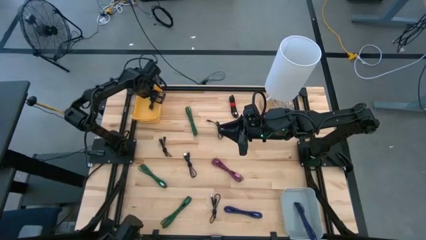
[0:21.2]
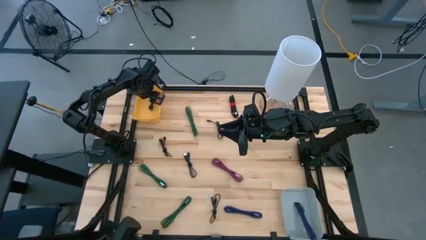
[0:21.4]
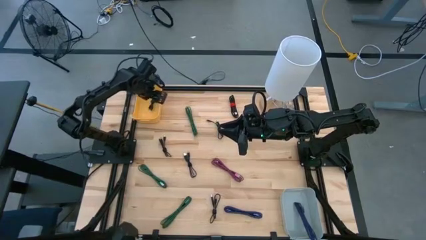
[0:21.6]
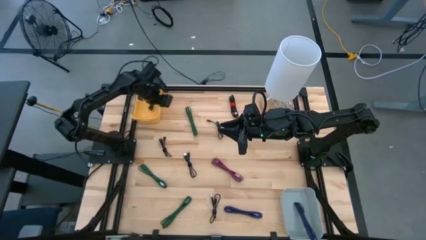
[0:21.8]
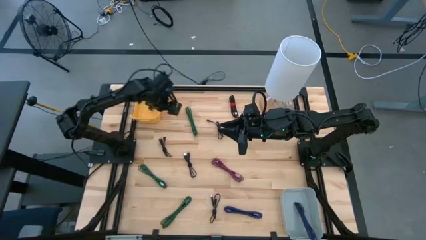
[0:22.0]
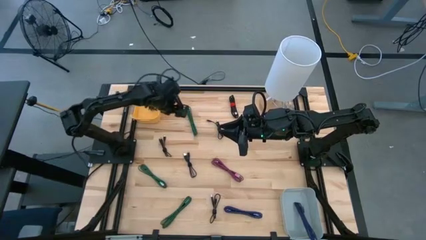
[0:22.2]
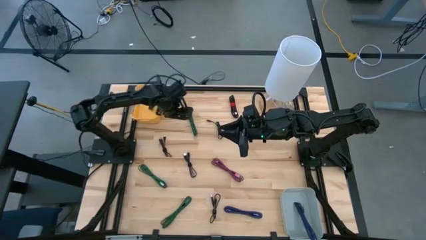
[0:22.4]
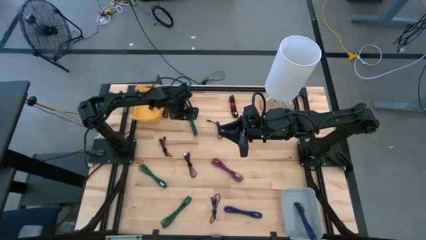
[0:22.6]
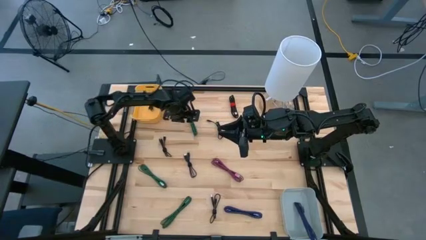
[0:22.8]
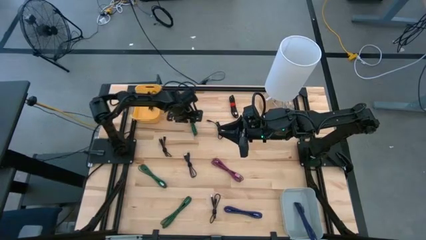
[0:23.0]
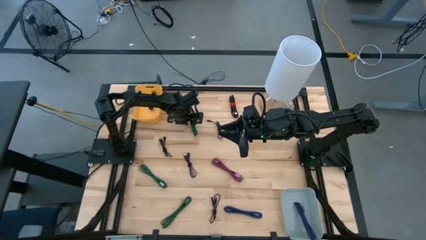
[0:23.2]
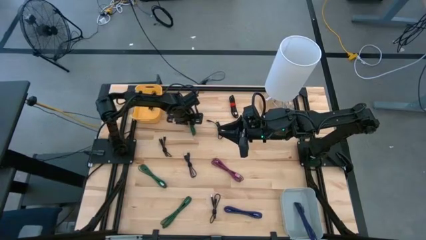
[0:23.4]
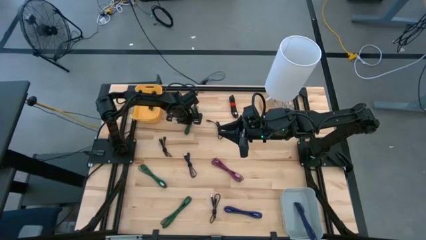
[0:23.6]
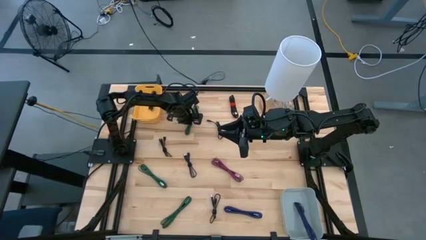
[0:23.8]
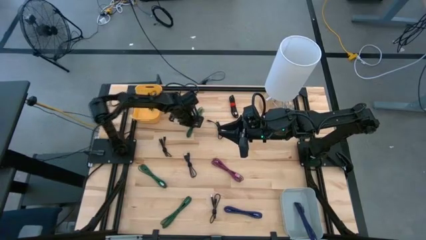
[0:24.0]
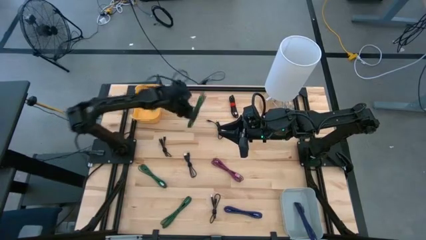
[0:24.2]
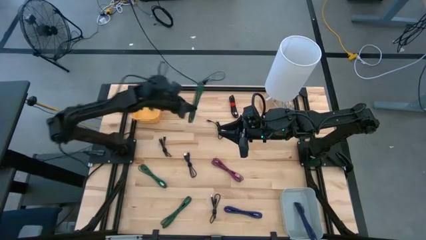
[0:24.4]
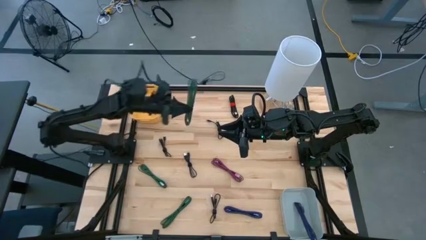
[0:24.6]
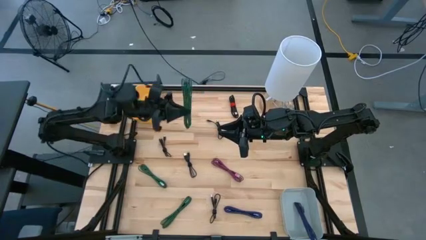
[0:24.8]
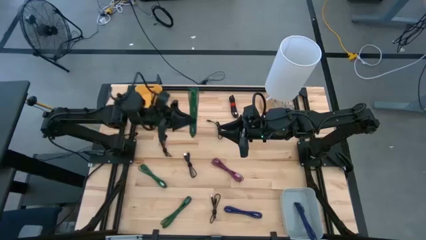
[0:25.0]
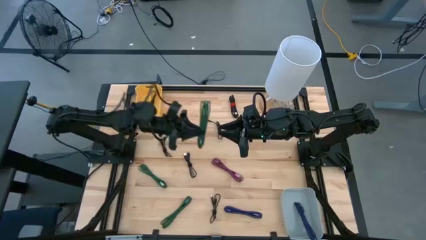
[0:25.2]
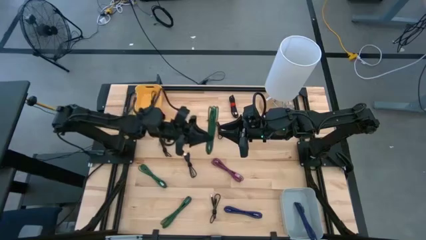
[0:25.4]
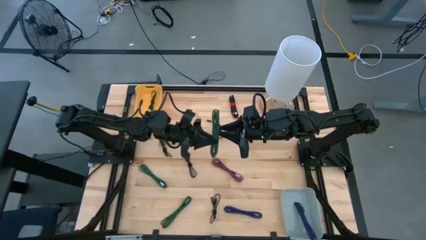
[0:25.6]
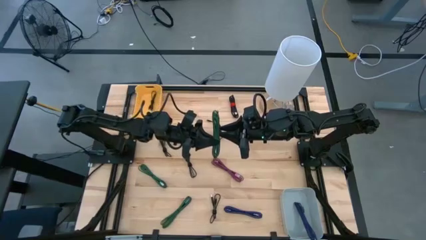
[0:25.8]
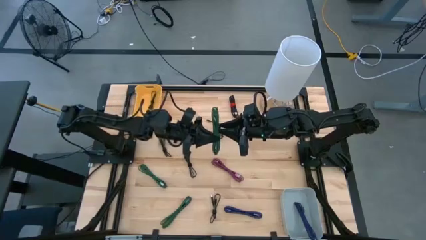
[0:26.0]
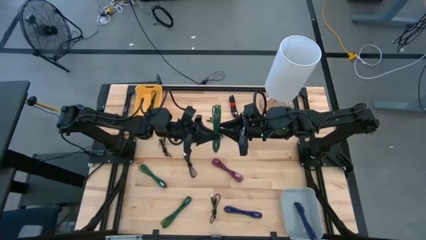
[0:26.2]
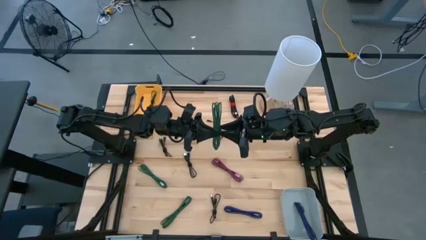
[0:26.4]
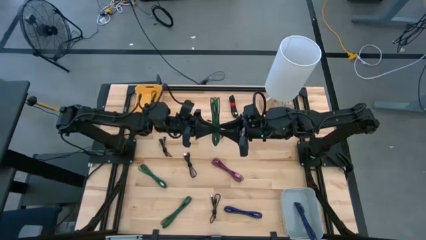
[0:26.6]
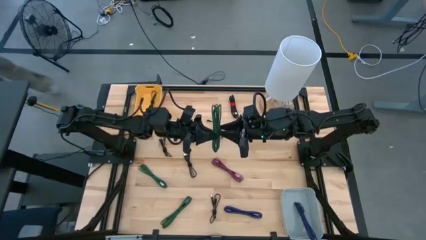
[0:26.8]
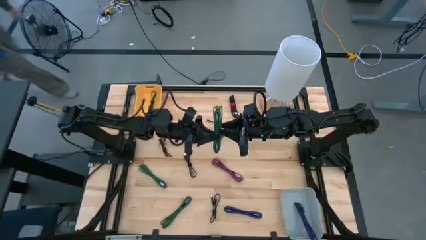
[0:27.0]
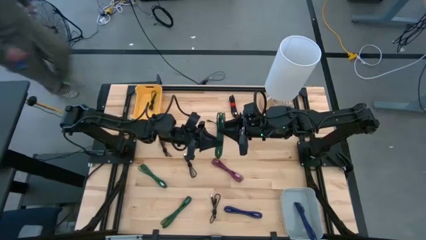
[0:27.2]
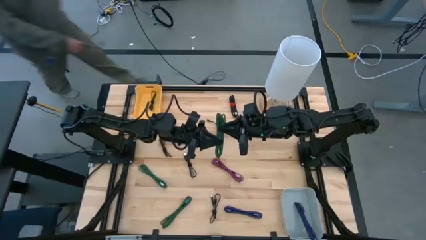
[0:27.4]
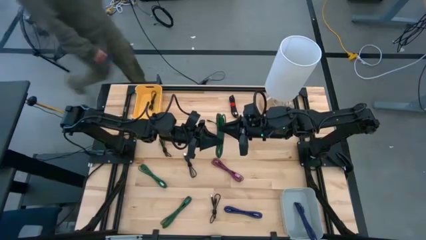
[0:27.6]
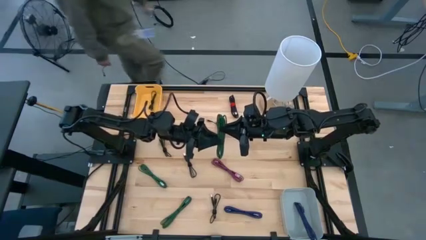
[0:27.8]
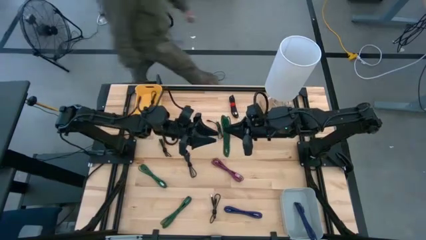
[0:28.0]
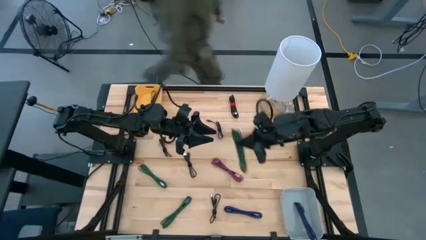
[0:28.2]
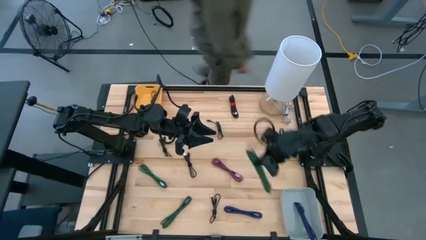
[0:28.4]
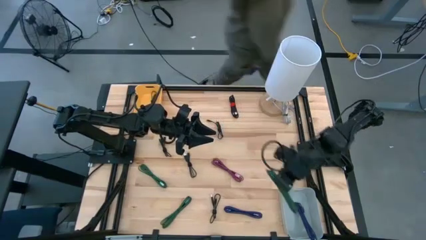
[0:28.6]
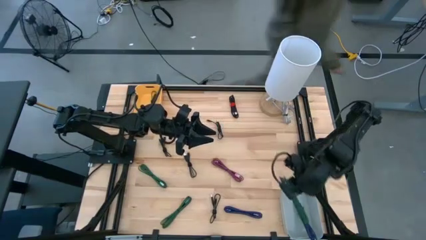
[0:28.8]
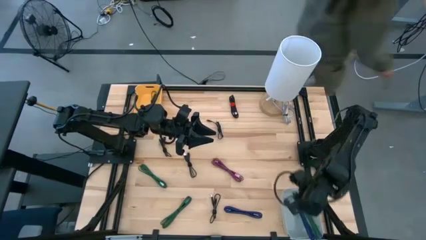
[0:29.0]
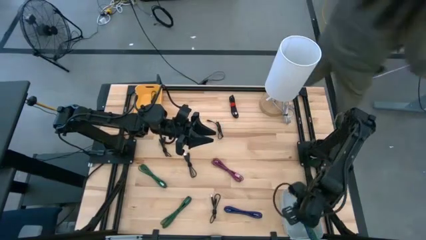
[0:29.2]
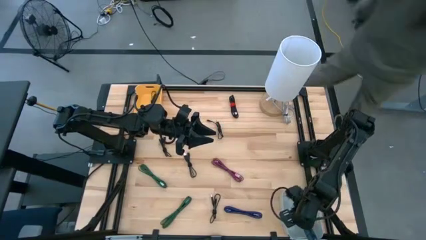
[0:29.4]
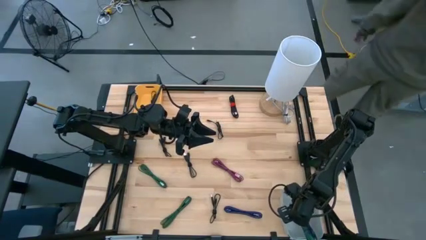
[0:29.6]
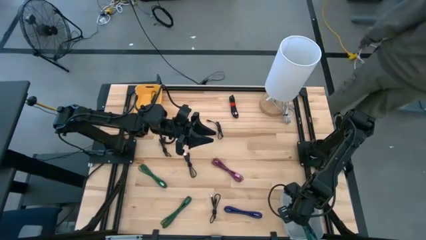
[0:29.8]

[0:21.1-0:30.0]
Task: Pick & Place USB Port
Put the green charger cable into the gray bin

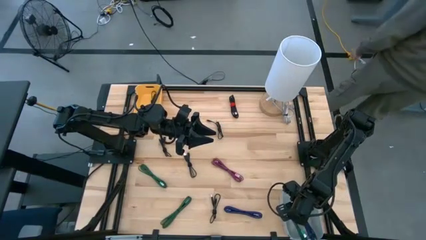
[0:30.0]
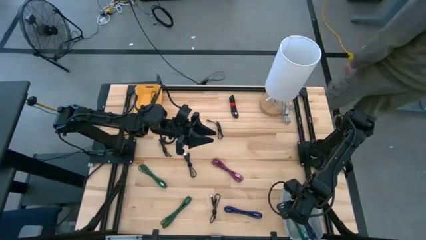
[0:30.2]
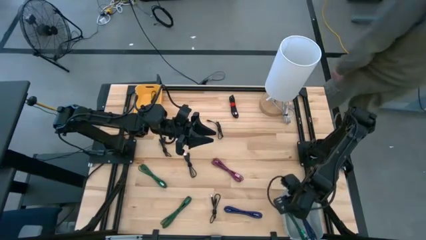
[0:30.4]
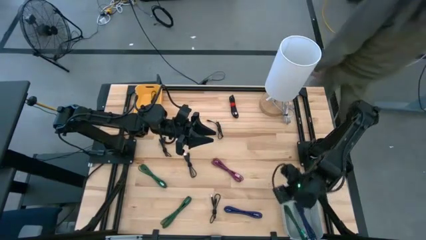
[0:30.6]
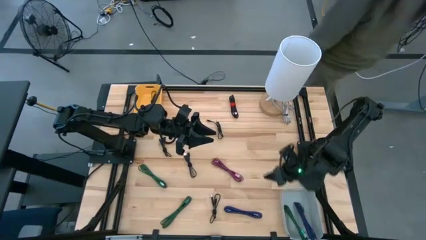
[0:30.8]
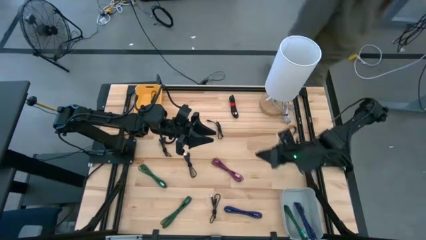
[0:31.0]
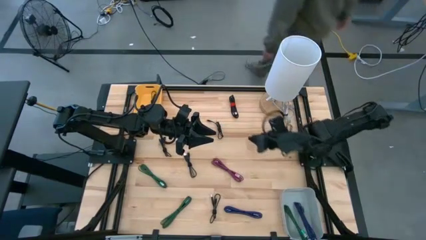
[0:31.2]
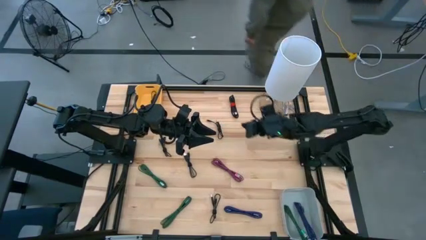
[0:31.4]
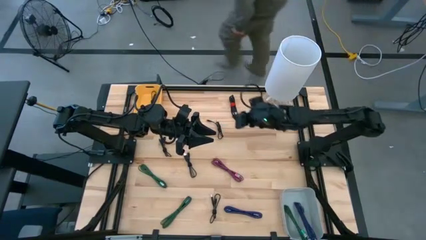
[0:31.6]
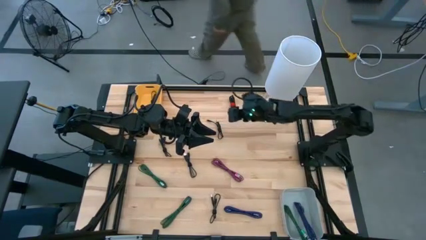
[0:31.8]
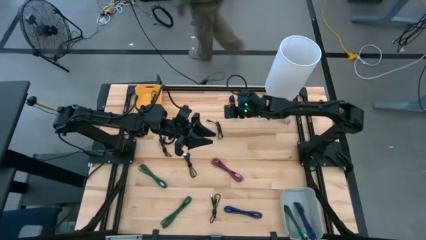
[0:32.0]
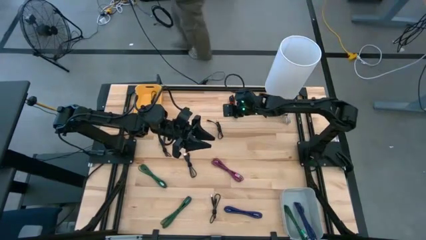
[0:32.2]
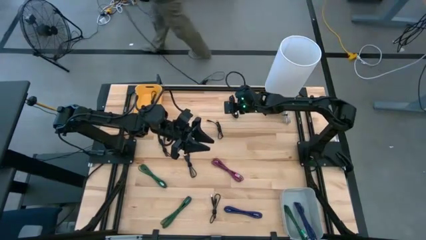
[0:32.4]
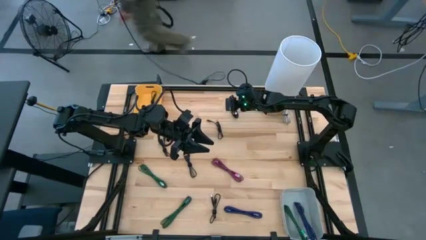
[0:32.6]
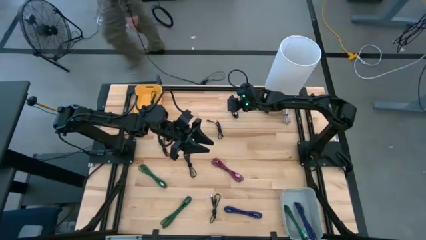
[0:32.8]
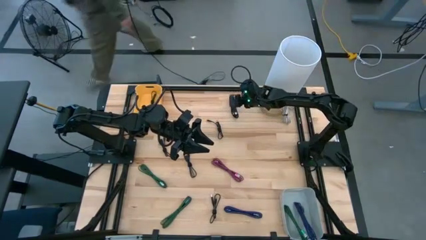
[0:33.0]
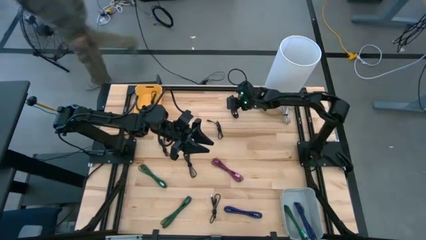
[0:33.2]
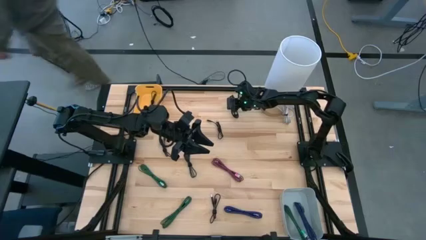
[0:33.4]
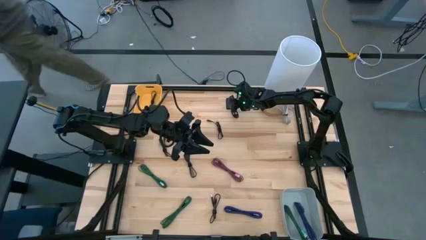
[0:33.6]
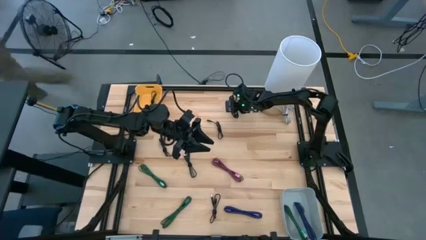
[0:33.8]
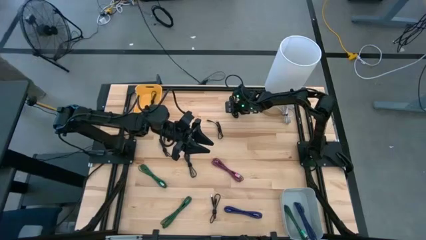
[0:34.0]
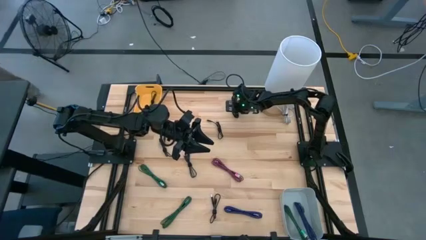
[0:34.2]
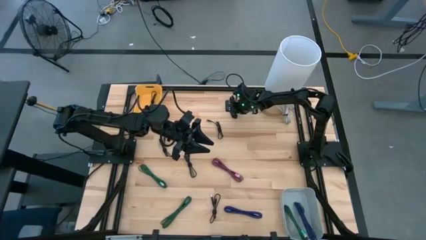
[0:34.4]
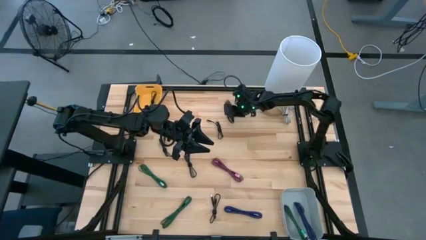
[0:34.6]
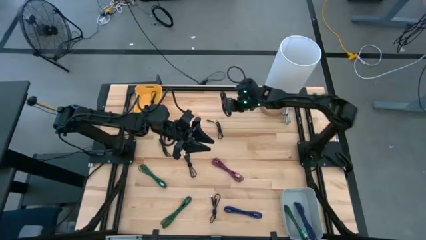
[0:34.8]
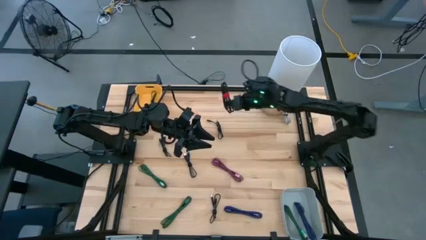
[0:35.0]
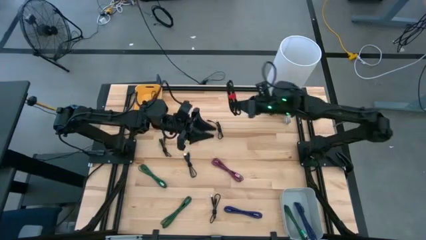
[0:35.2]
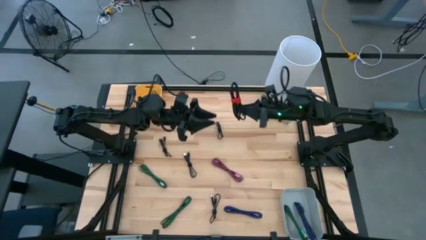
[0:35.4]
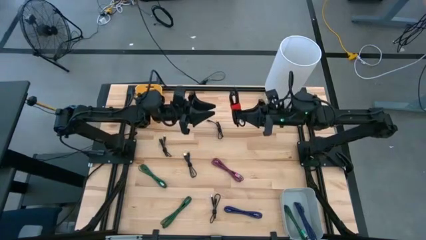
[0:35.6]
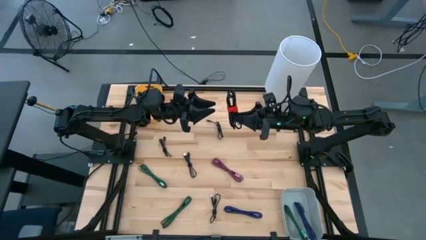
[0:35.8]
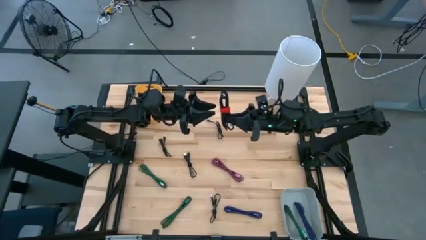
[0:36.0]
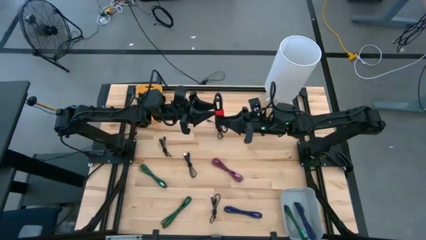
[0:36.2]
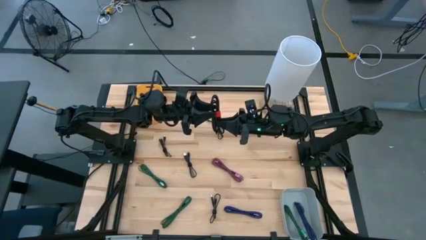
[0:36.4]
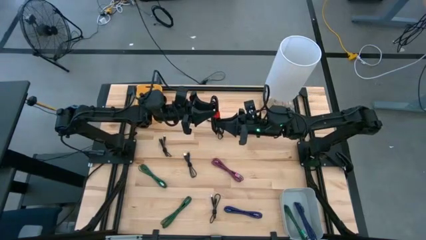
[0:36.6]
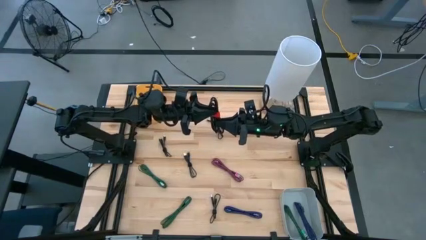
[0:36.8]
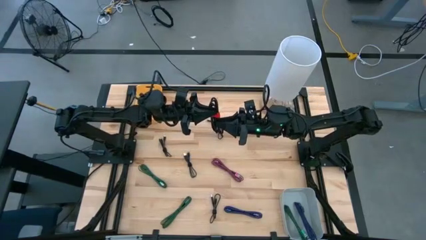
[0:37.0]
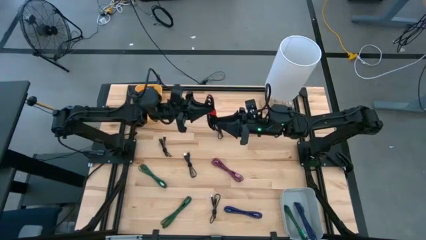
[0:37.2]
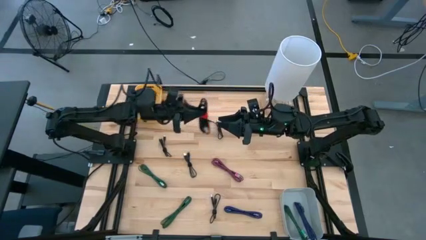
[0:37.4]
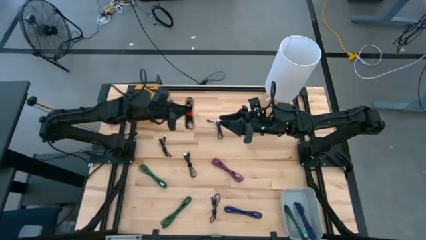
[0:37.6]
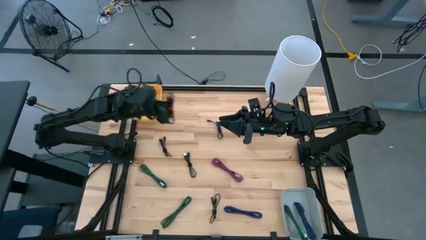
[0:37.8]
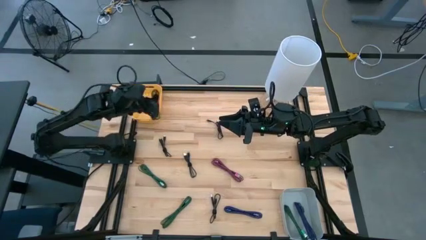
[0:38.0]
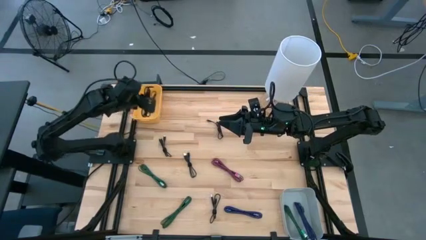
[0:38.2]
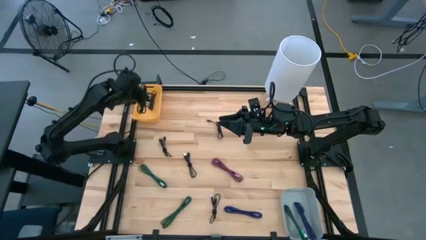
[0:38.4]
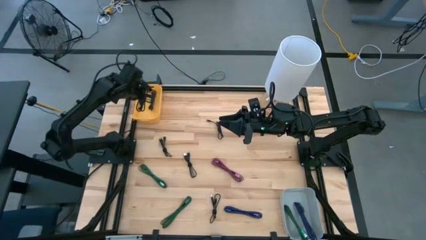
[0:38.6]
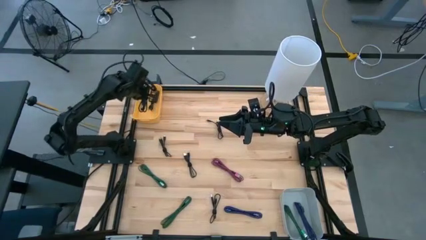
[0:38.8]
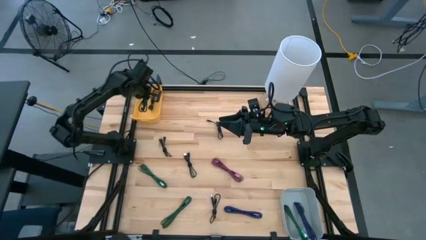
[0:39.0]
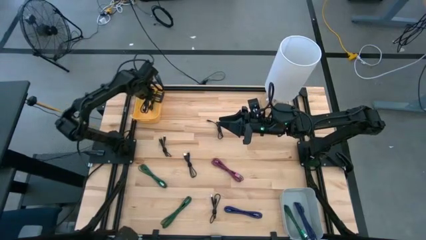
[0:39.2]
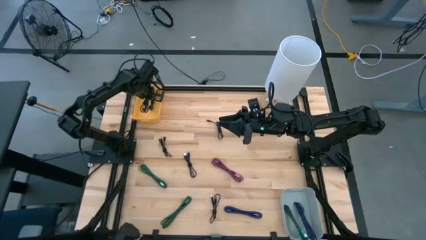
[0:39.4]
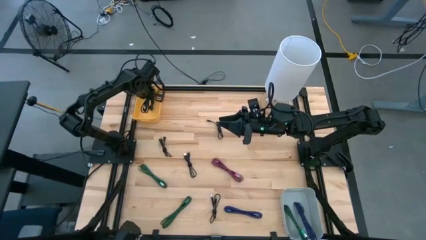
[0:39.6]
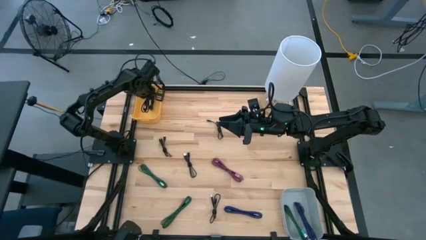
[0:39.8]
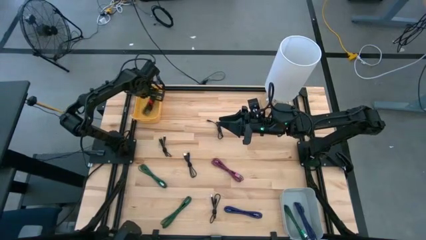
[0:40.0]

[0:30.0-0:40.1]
Put the black charger cable into the yellow bin
